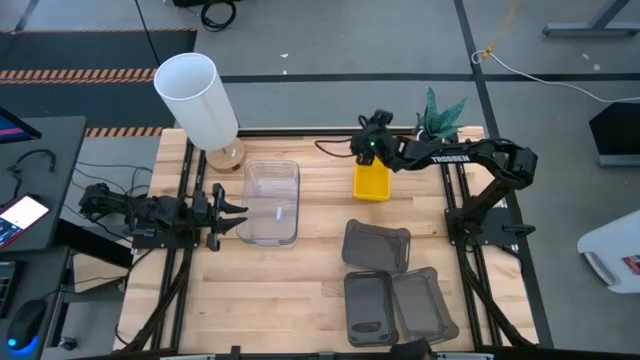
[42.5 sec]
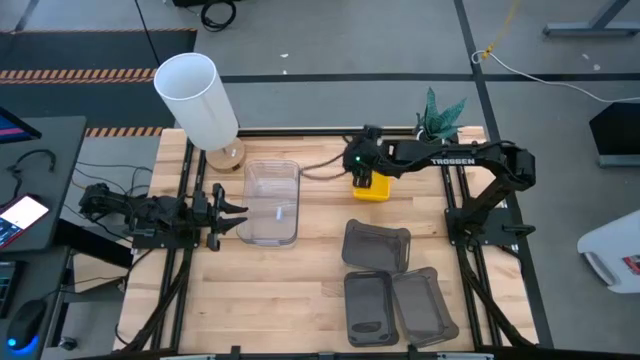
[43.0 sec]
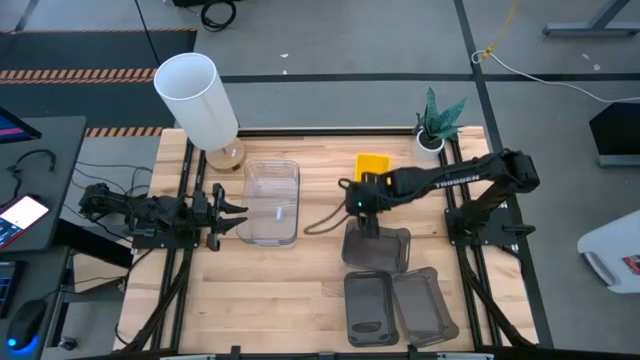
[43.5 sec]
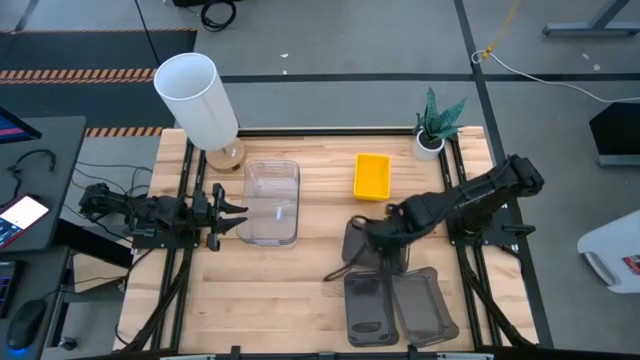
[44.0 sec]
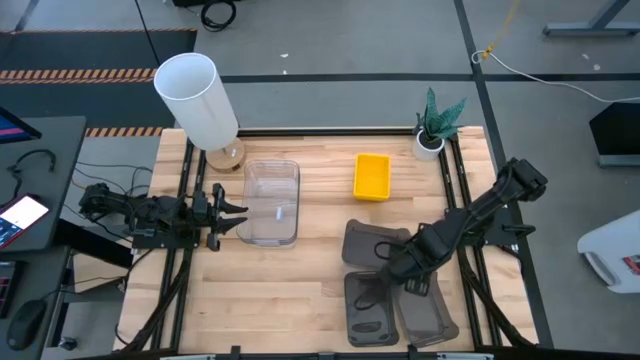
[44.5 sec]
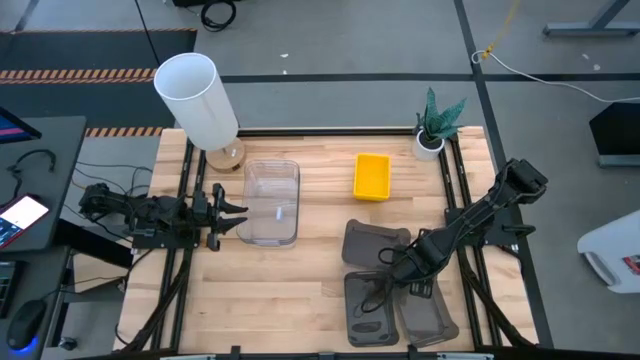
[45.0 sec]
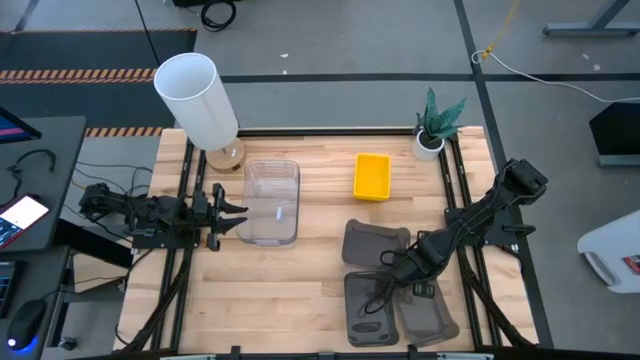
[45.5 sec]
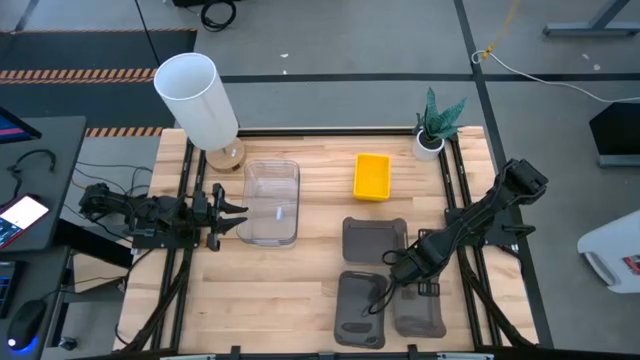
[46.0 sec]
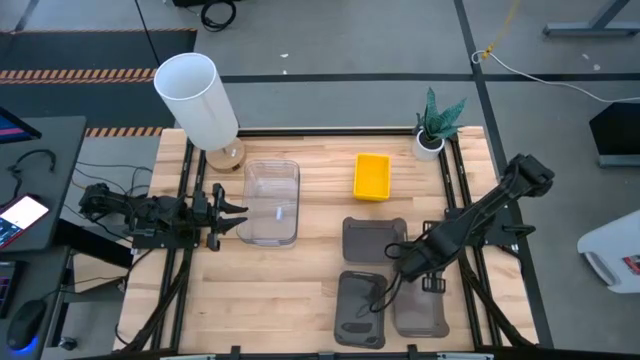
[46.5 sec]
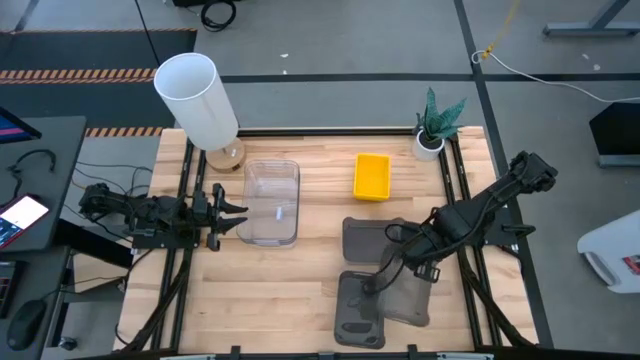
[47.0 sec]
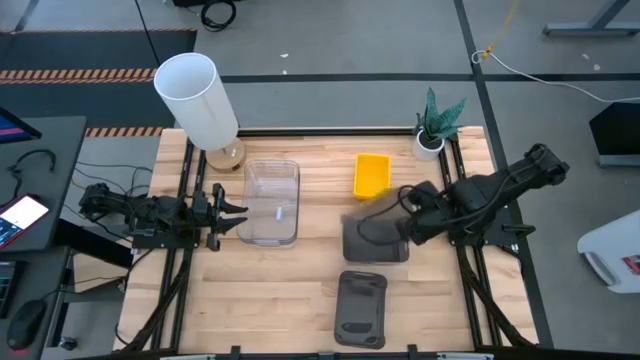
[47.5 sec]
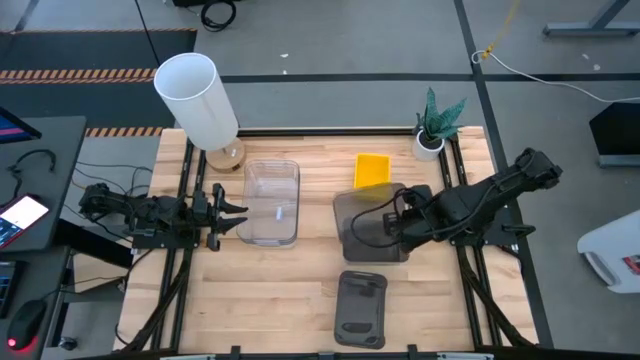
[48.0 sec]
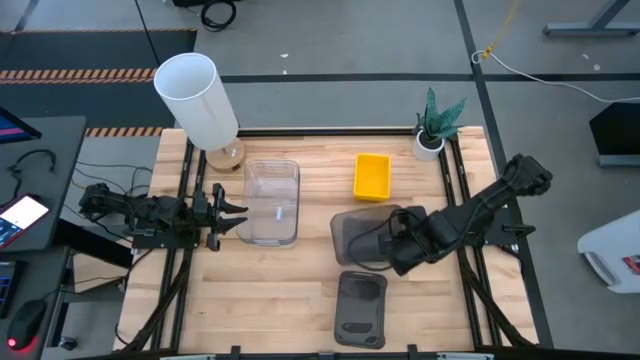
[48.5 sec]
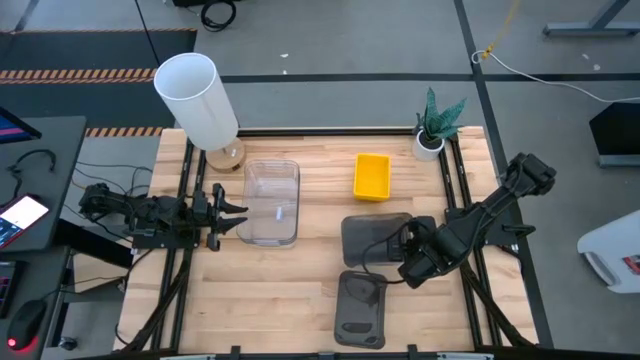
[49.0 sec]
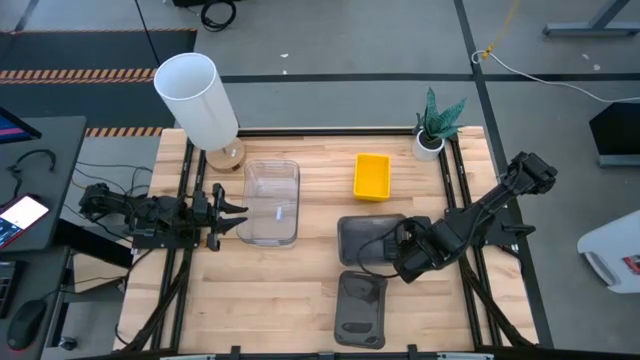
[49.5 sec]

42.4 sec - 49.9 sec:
Stack the bottom right black bin on the top black bin

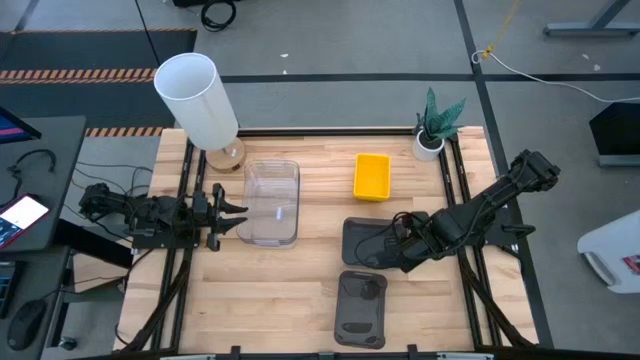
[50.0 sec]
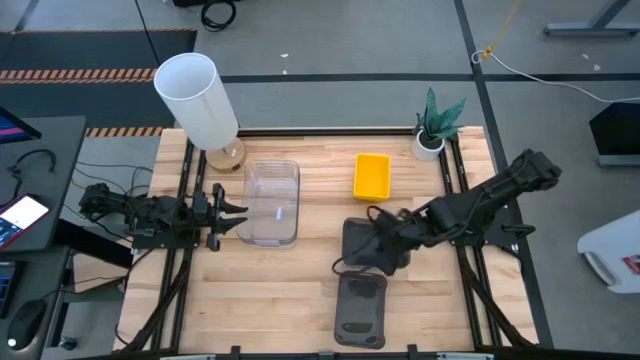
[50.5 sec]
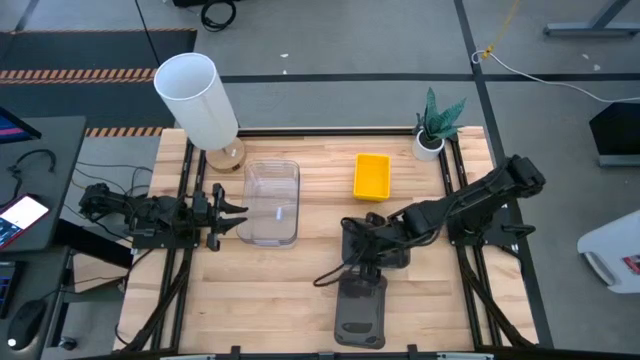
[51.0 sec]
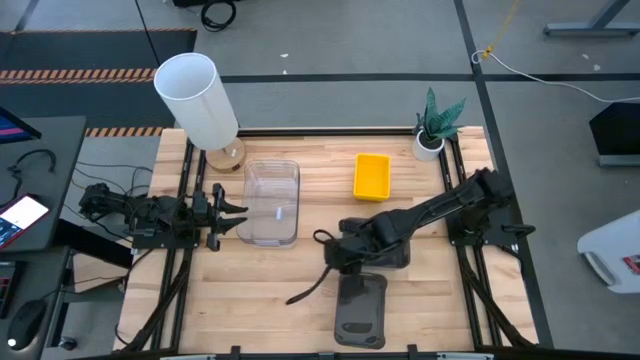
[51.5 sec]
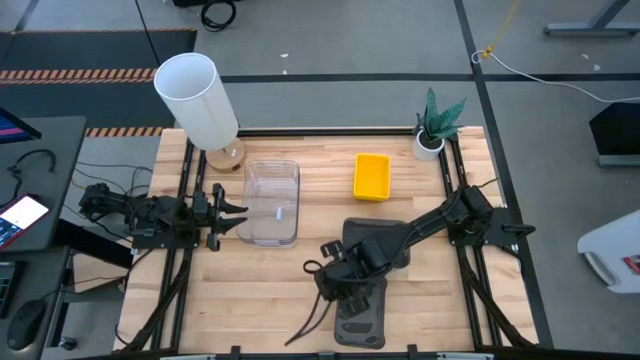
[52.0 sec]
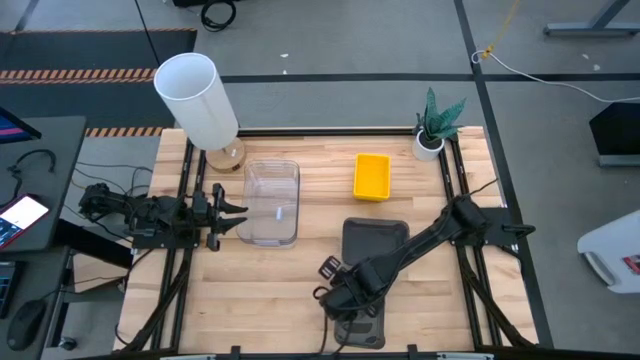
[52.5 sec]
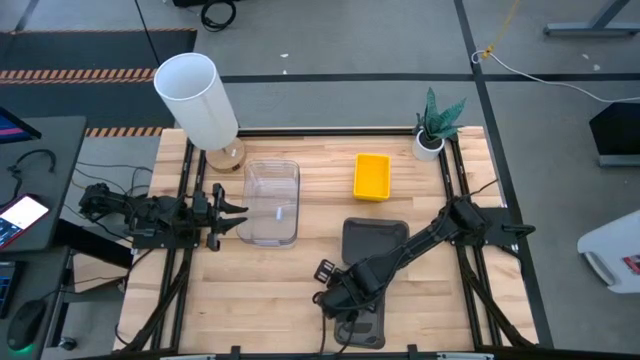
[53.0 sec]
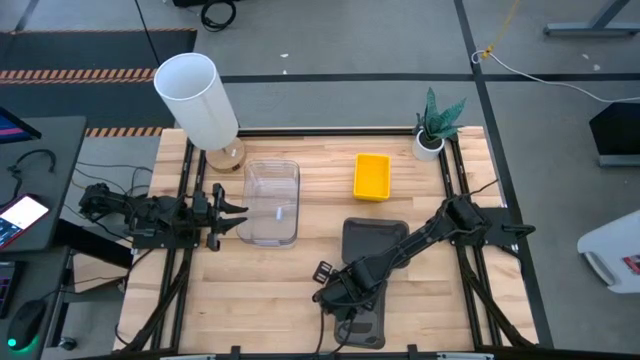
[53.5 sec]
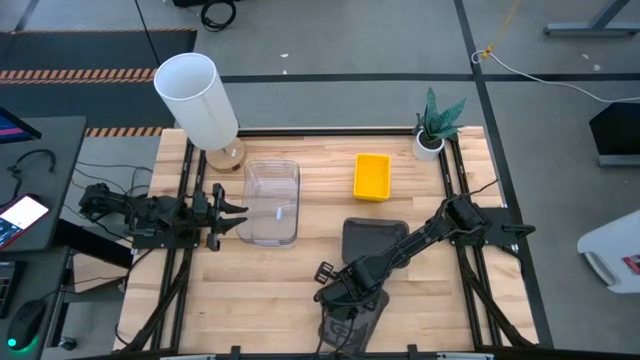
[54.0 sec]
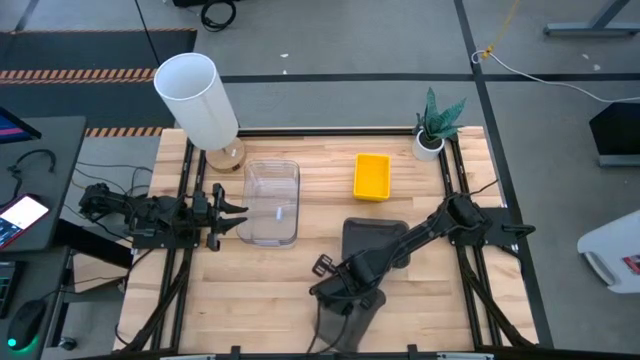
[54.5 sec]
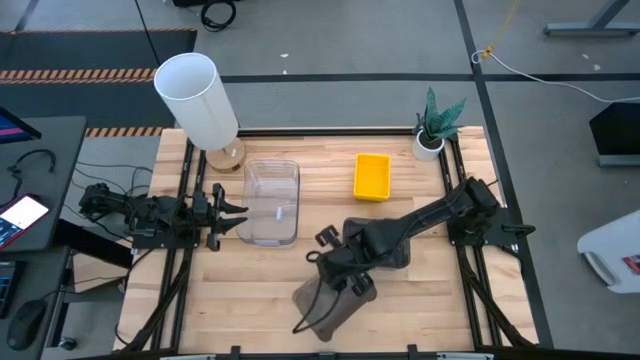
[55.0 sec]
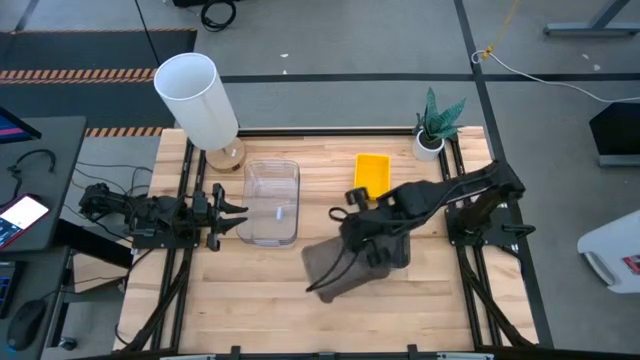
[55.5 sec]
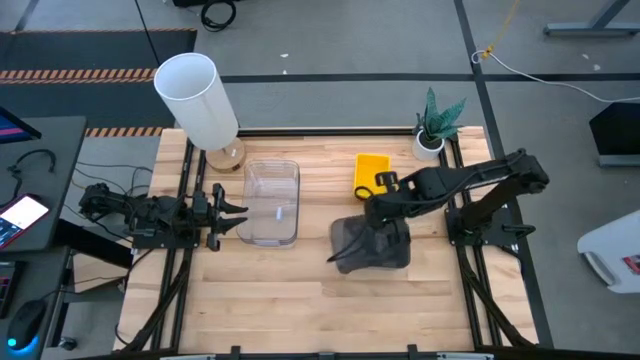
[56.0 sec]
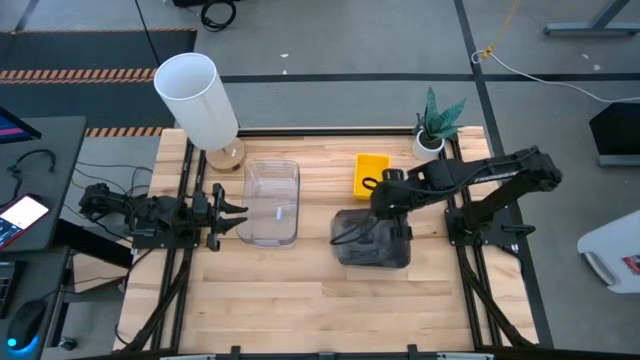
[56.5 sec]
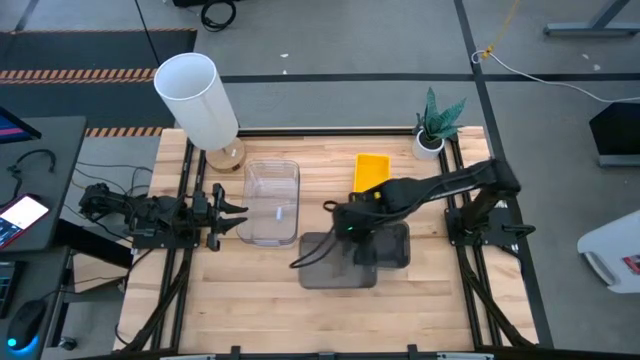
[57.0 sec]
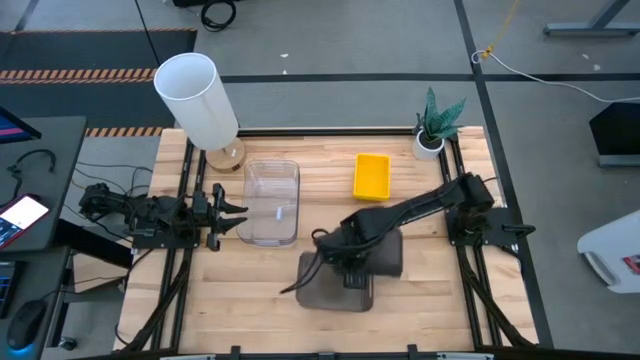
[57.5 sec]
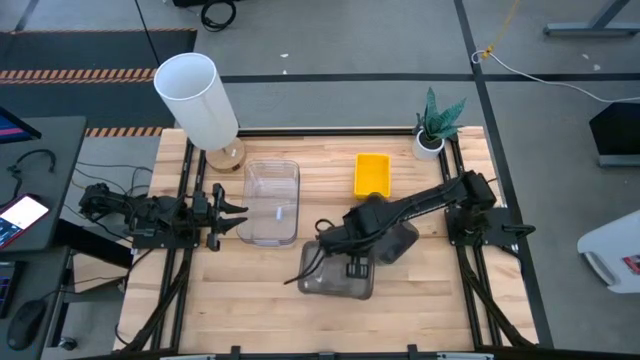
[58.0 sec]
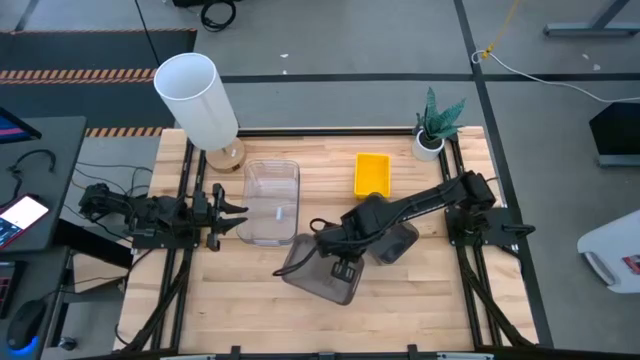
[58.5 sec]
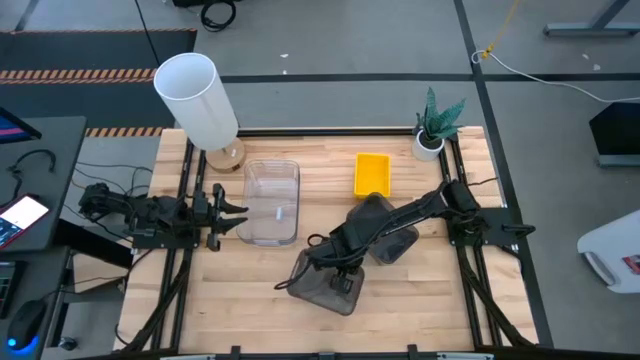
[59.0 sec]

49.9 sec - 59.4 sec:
Stack the bottom black bin on the top black bin

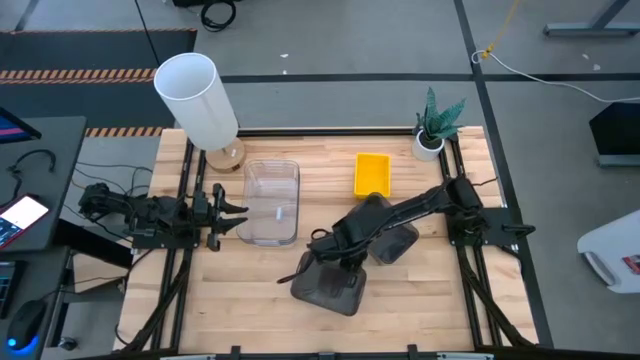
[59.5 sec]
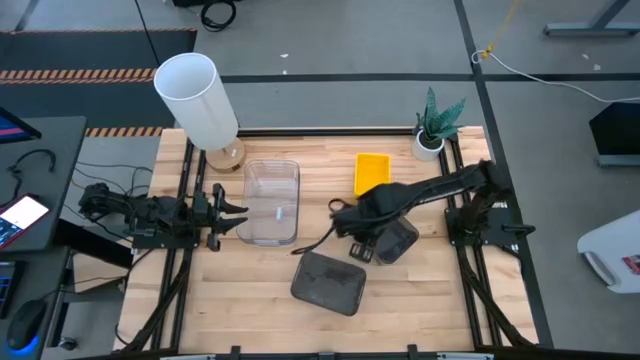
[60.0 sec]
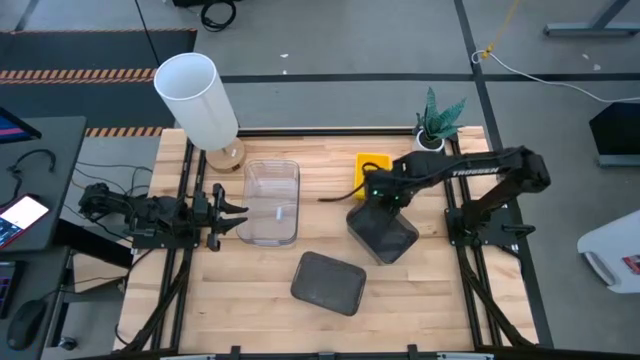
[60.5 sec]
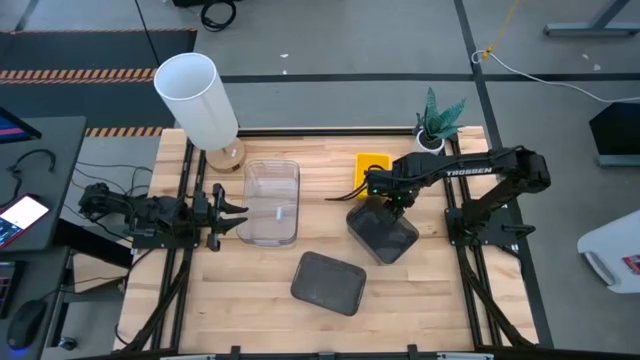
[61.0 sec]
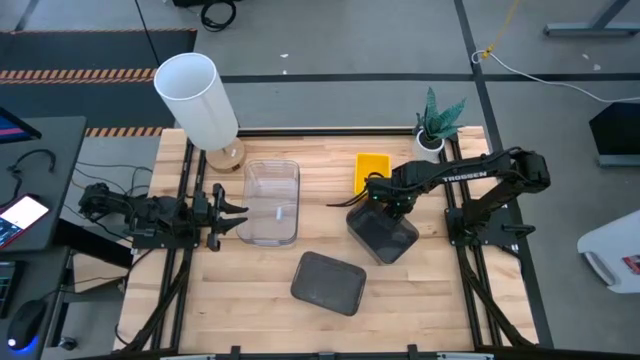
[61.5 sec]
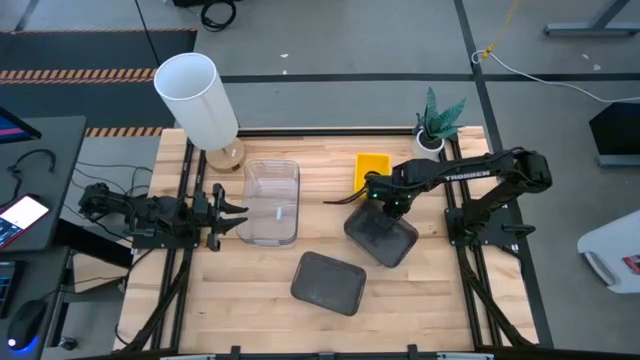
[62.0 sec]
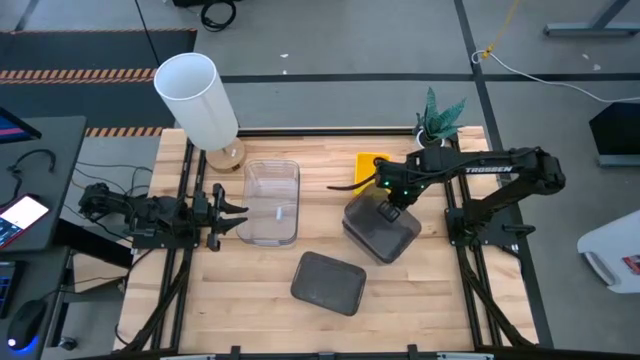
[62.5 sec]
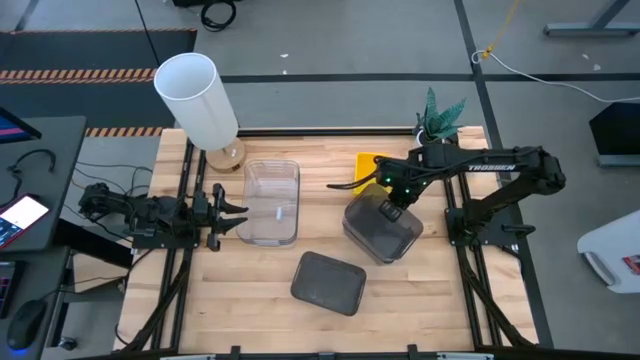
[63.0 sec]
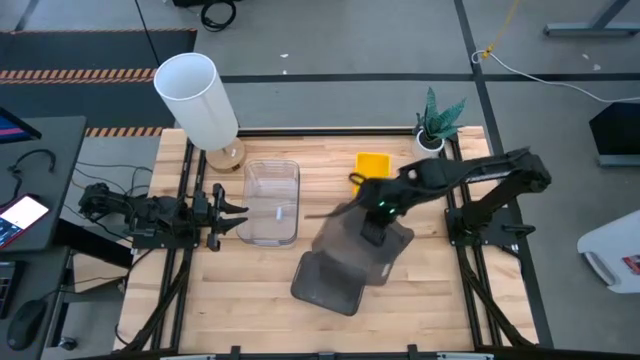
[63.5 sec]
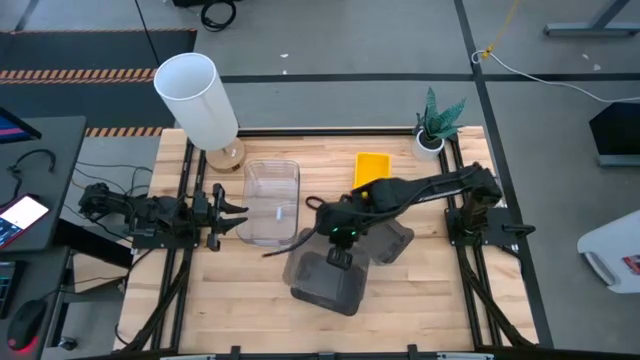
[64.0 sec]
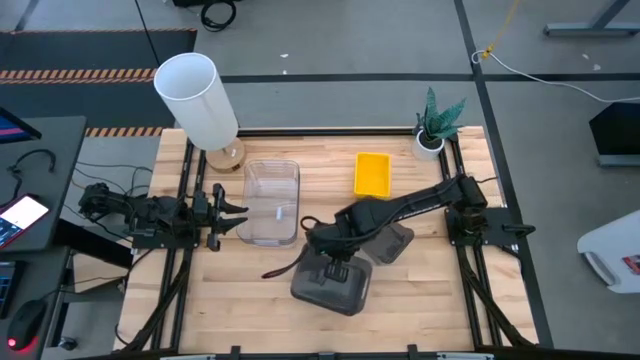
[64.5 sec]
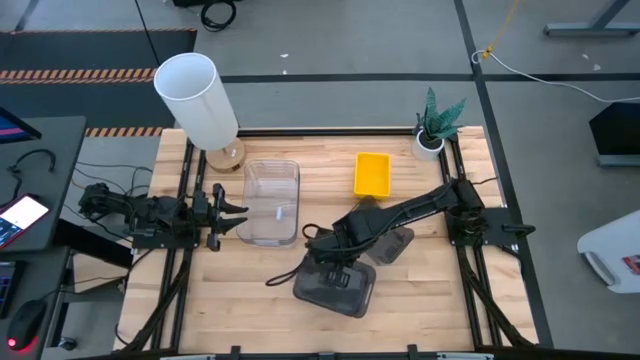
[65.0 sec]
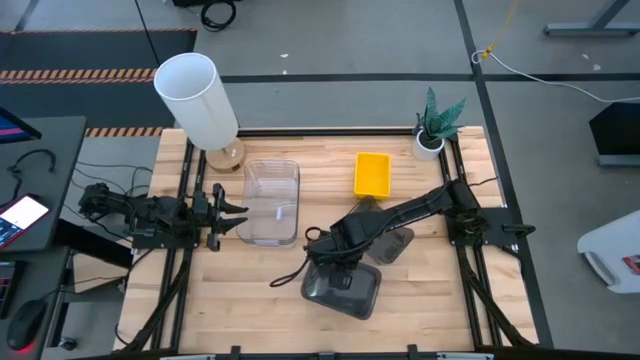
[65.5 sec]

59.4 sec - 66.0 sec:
Stack the top black bin on the bottom black bin
